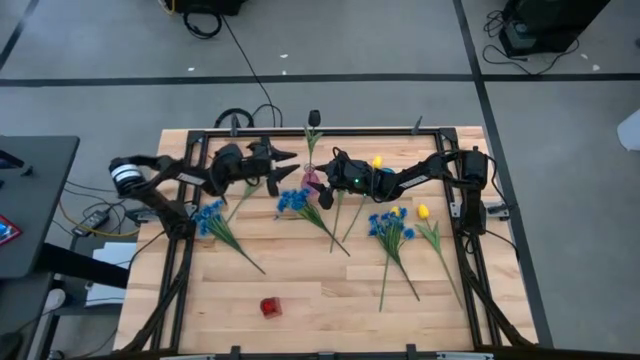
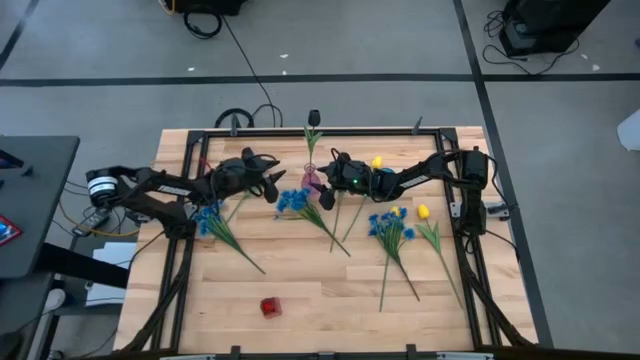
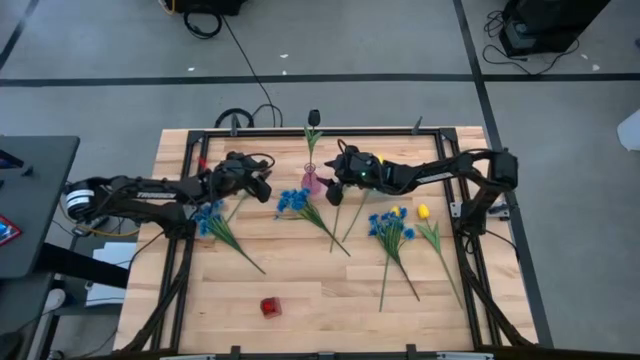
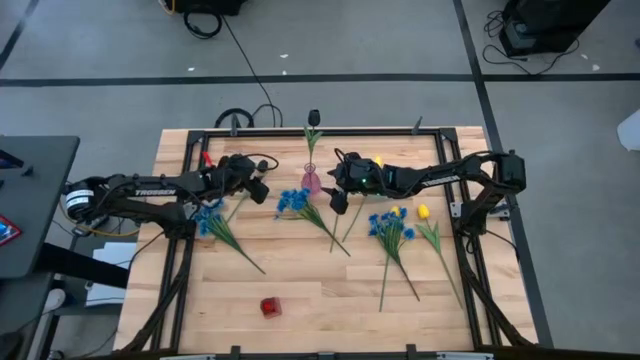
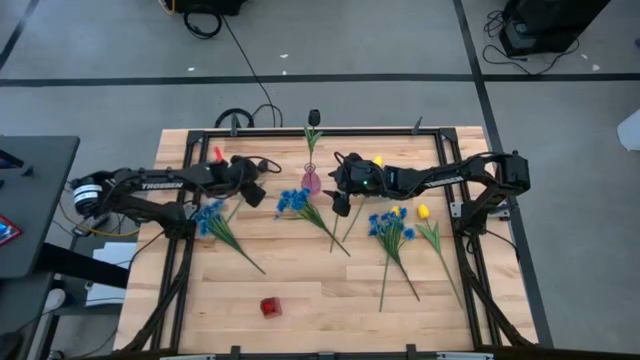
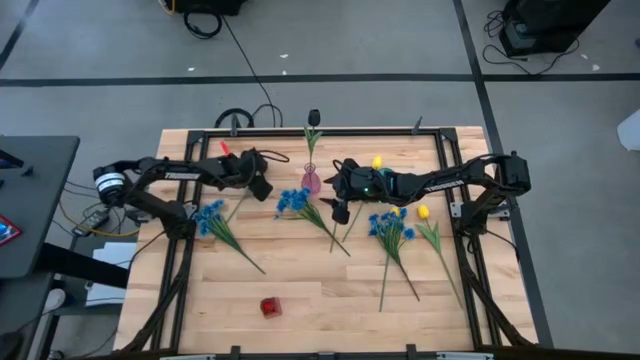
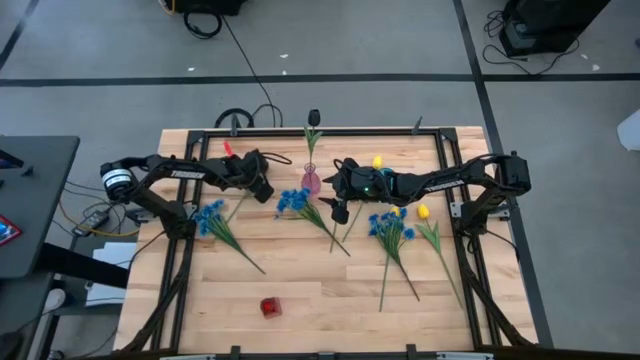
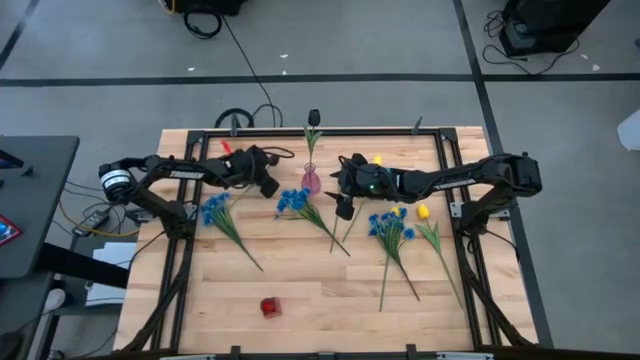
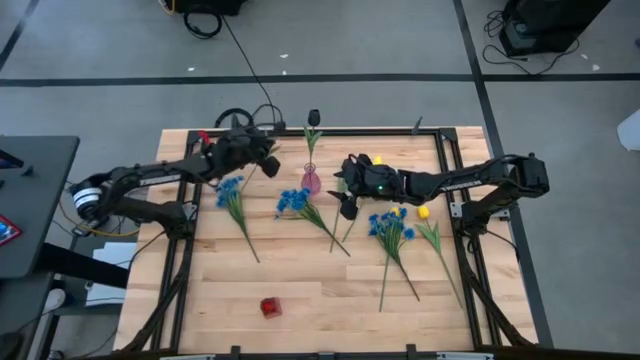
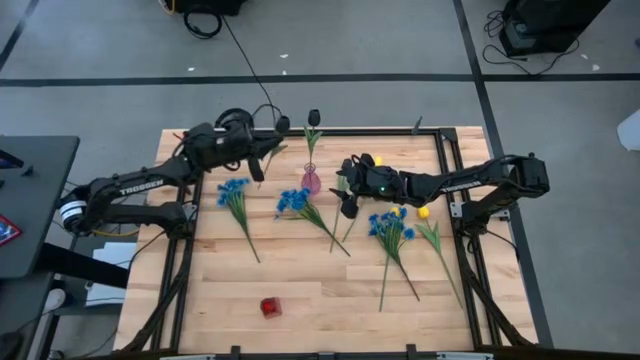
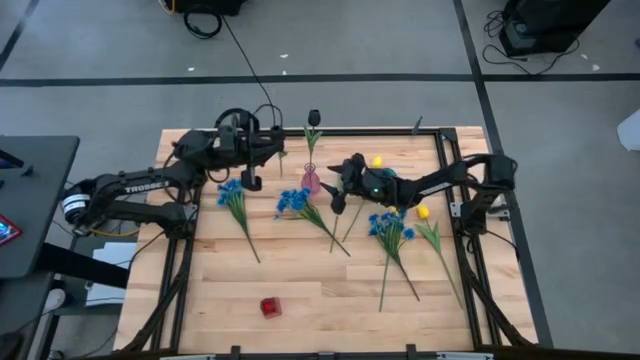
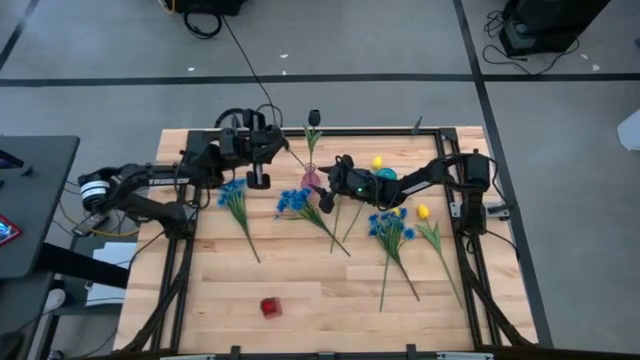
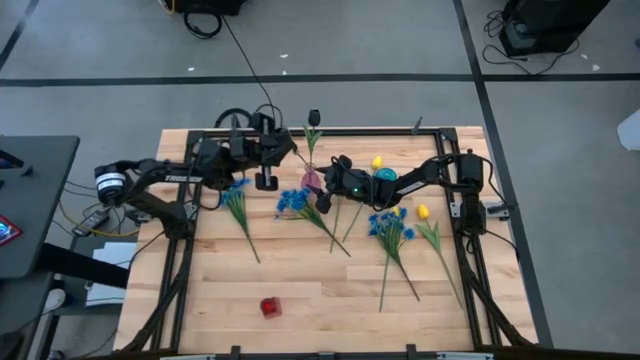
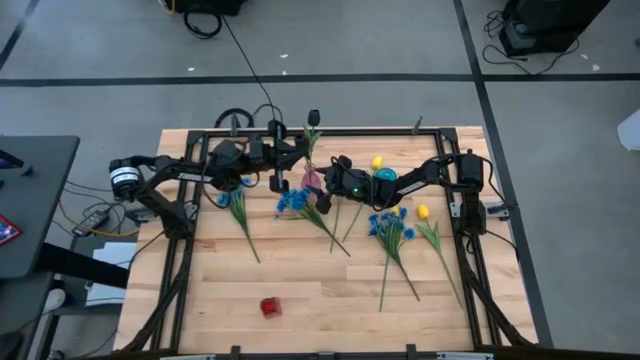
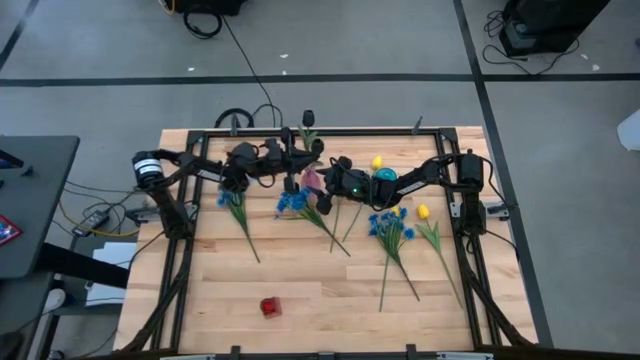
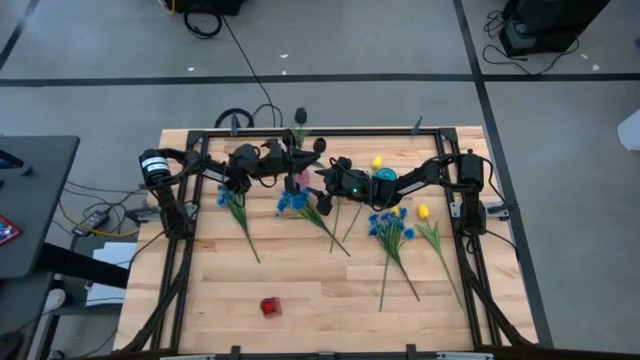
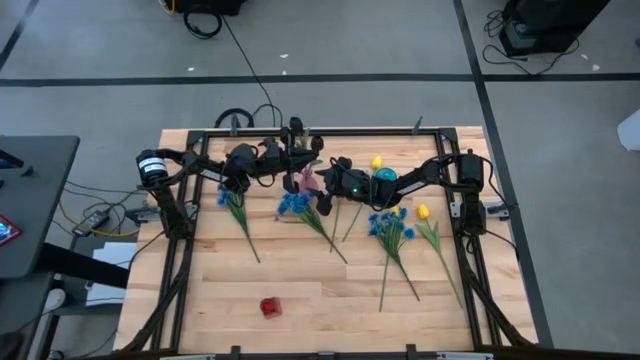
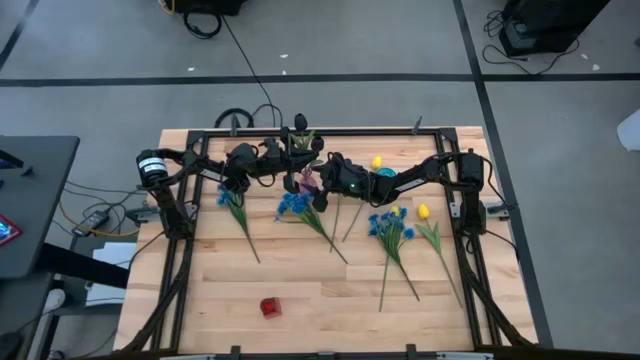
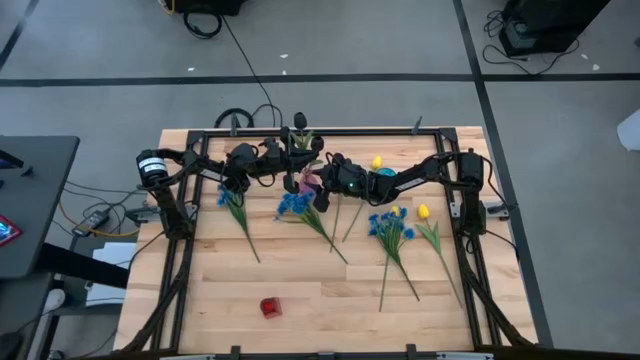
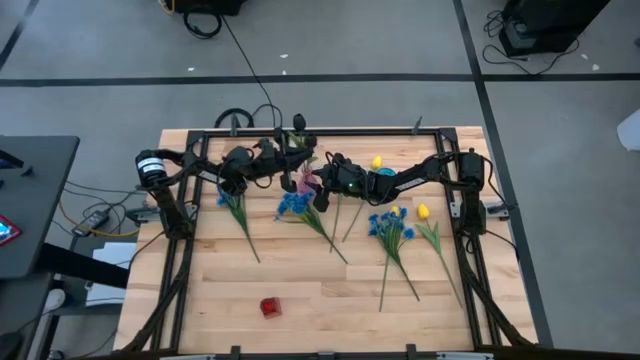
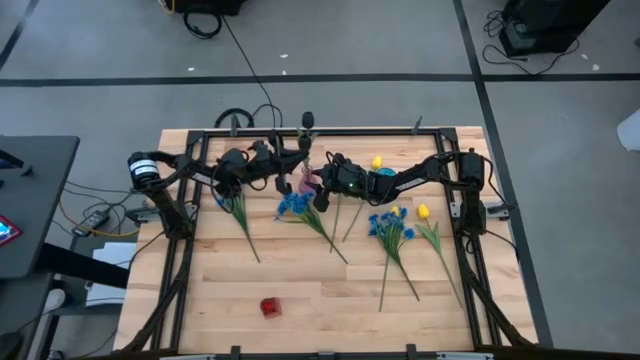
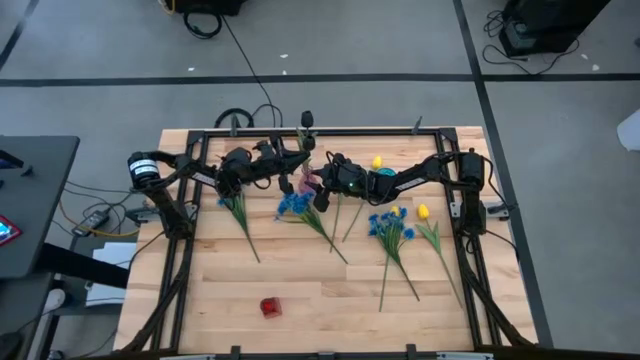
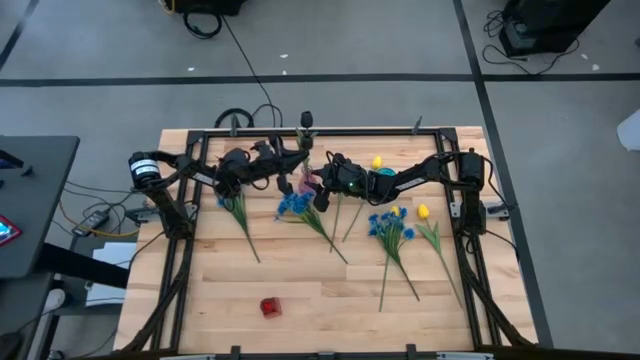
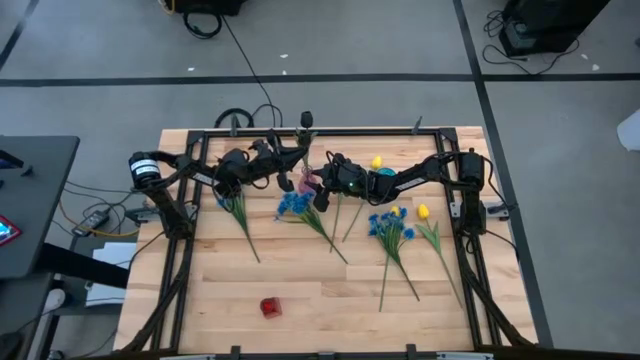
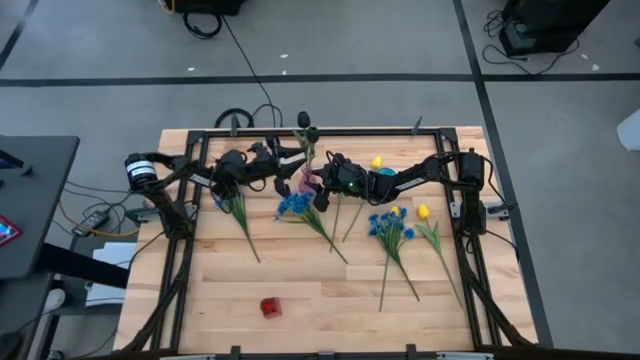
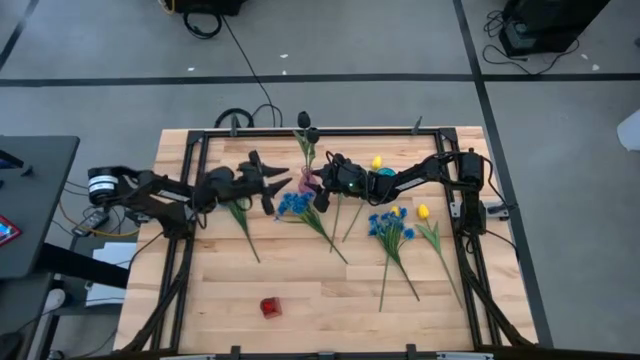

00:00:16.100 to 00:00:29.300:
Task: Sort flowers into vase by color
Put the black tulip into the purple vase

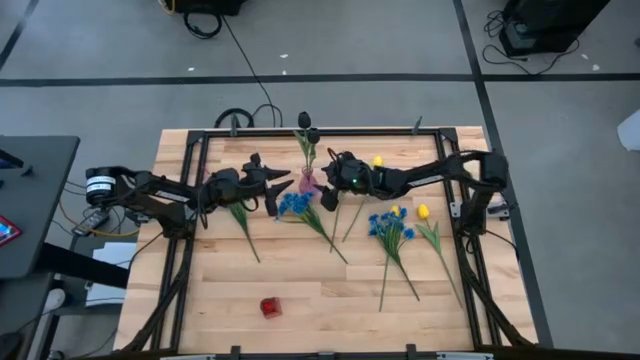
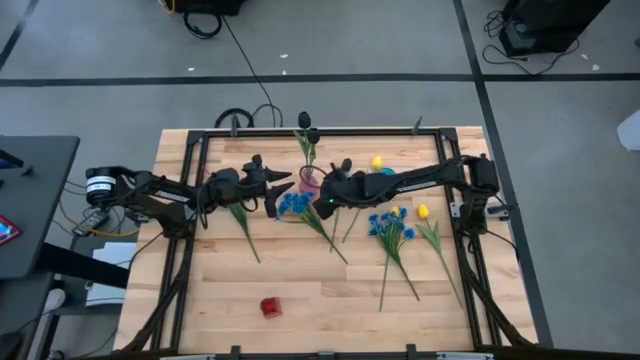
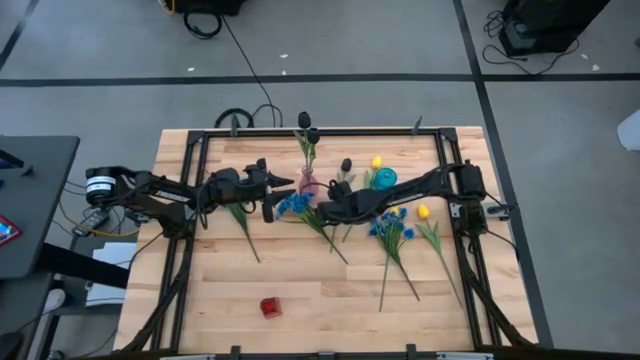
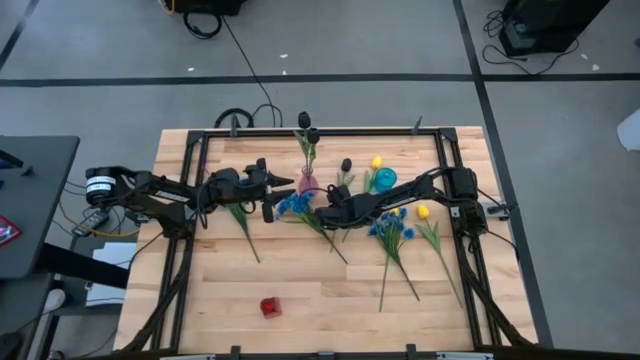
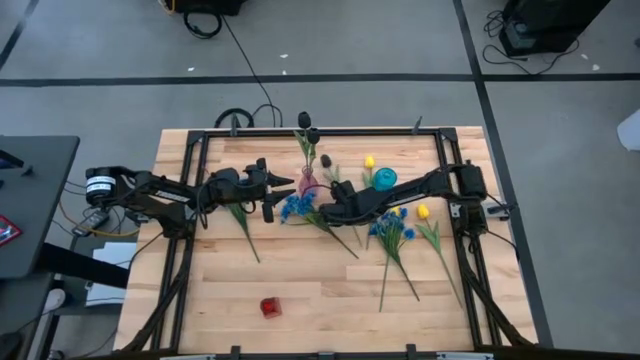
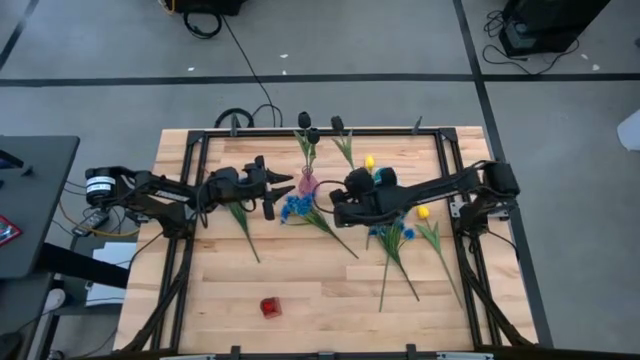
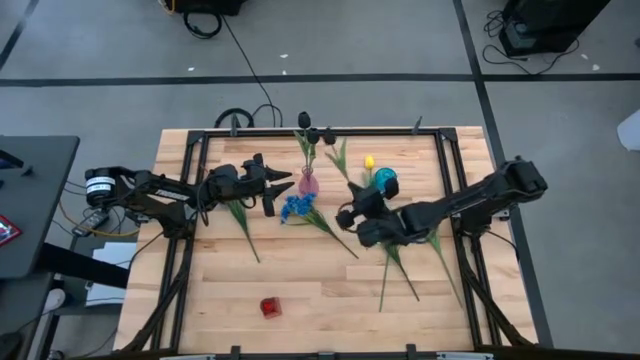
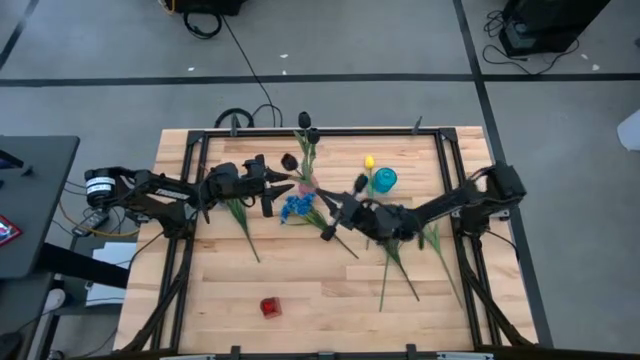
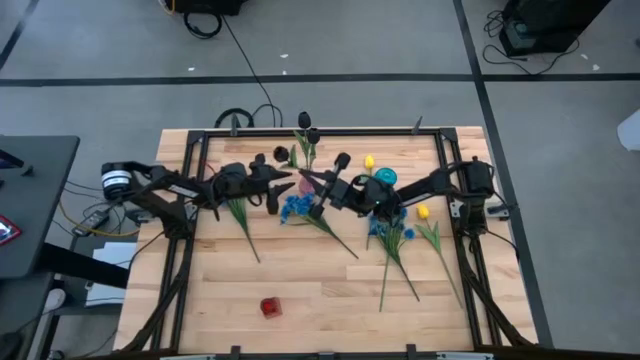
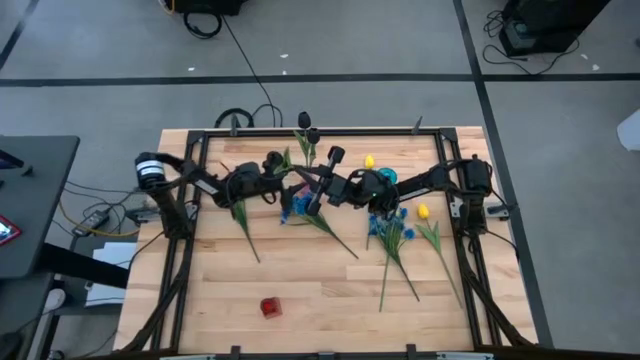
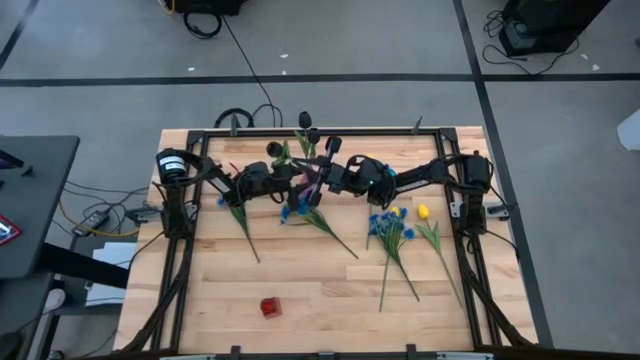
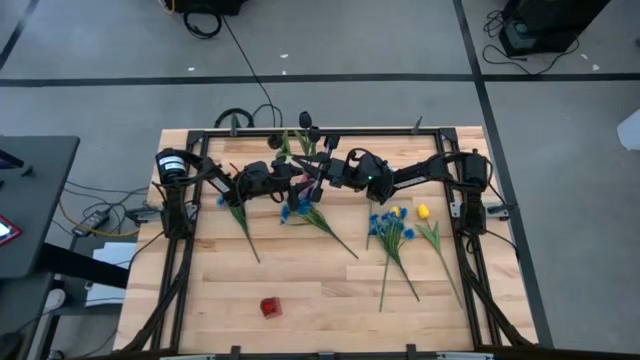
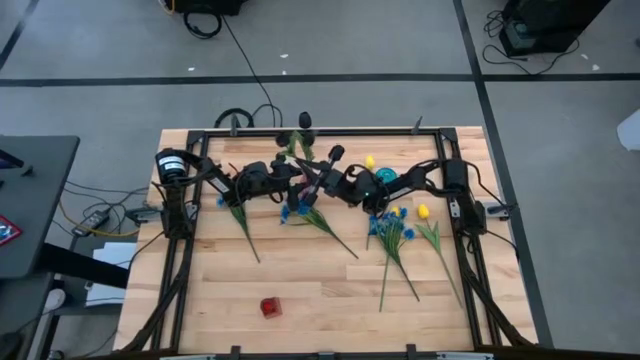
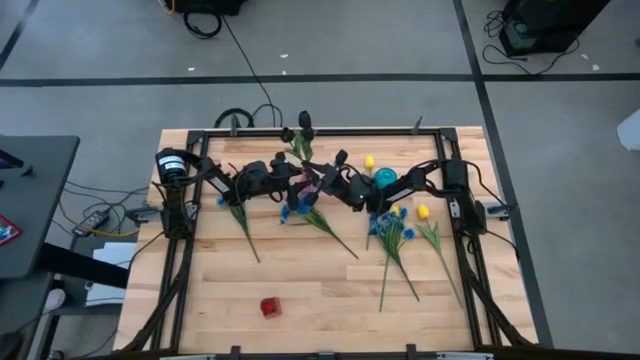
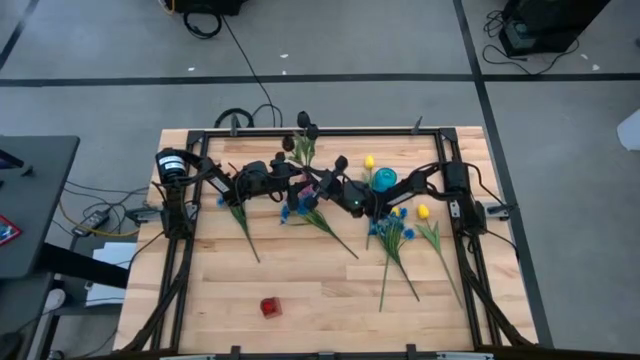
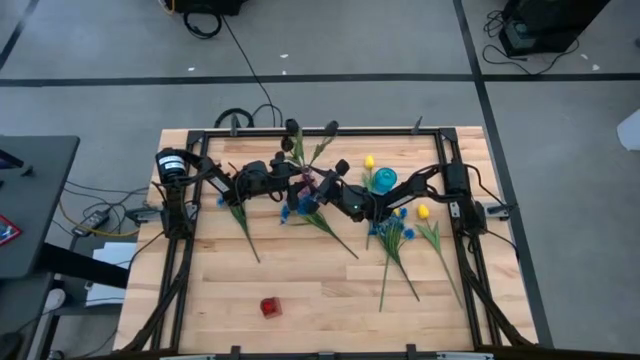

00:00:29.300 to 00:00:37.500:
Put the black tulip into the purple vase
